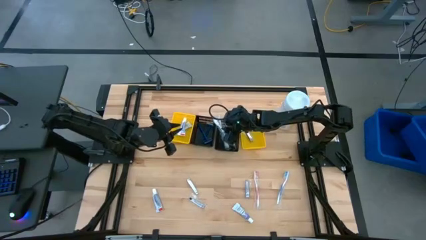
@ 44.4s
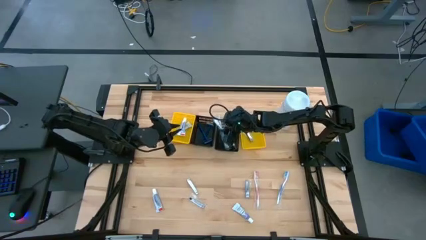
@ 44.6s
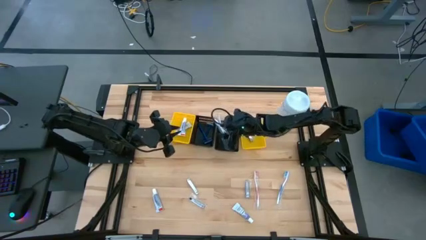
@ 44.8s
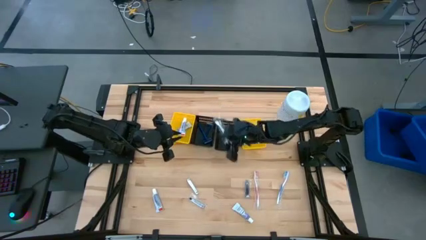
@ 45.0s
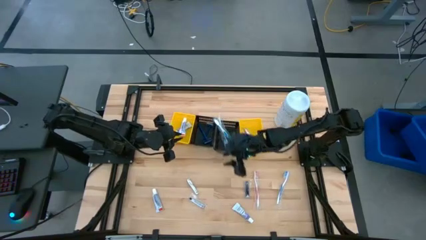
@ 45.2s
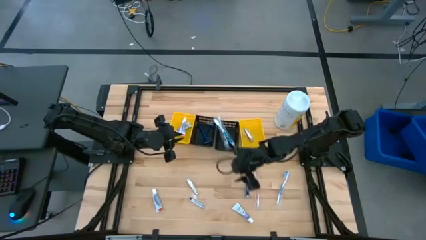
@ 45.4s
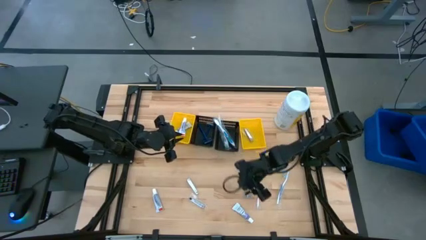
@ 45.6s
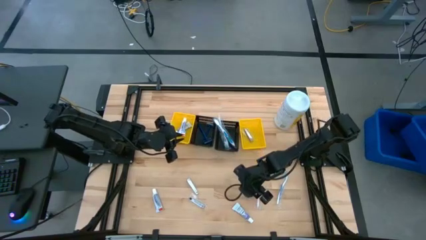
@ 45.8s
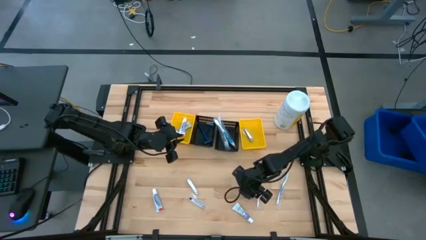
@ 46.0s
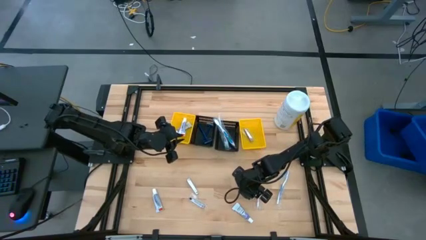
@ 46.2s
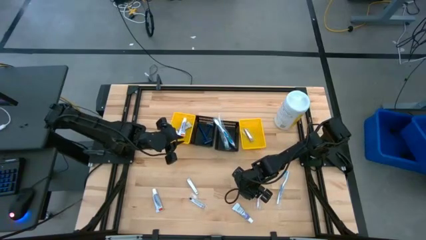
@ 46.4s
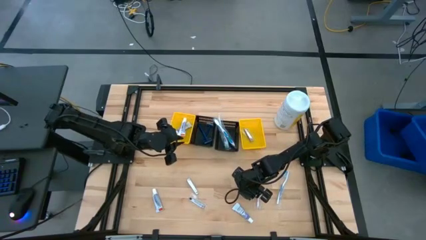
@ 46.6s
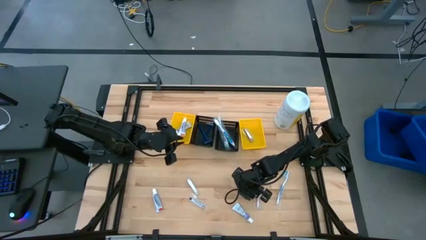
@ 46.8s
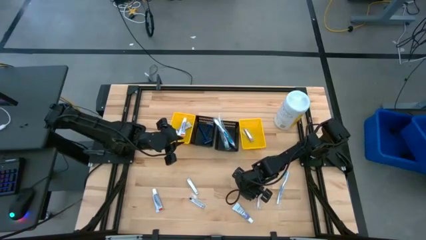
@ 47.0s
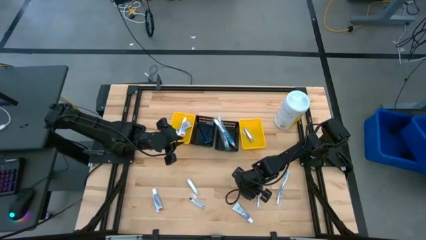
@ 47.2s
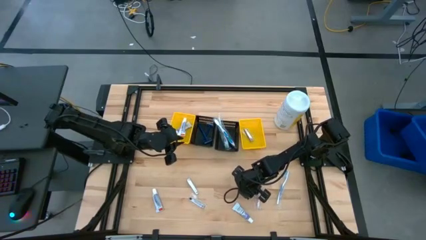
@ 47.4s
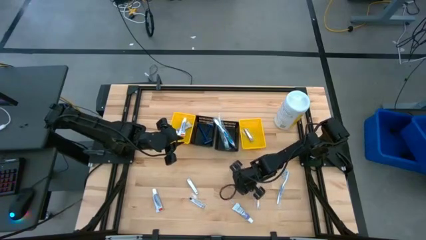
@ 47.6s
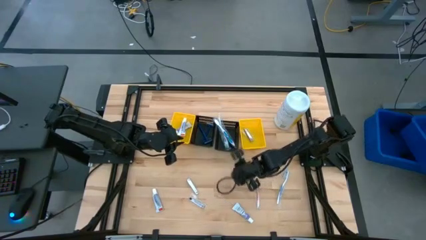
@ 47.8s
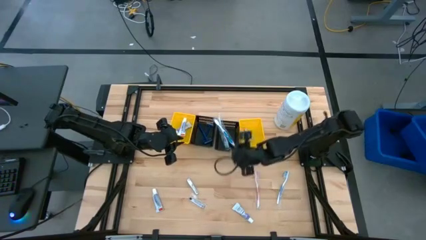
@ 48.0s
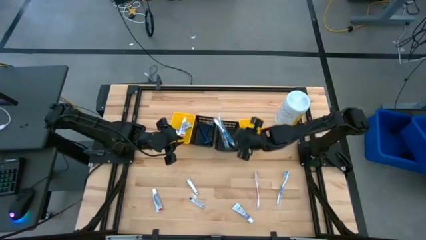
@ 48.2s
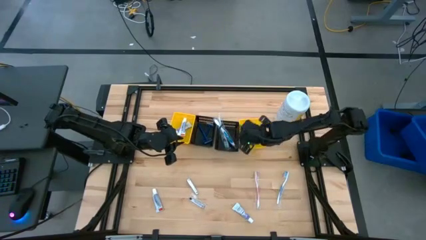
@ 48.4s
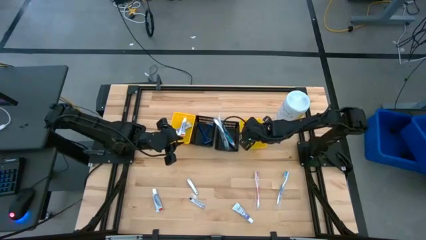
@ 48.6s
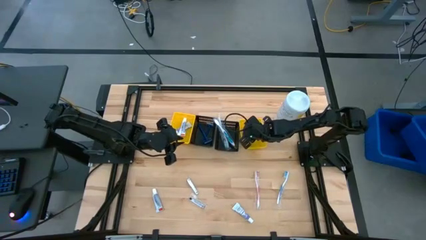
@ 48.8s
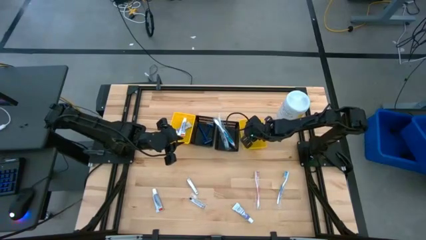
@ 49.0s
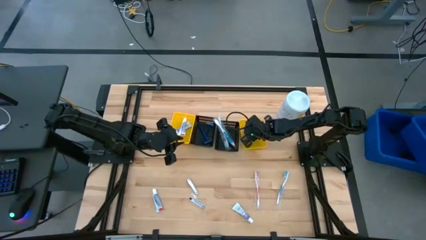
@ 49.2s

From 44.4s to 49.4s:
Task: Pick & Place Travel size toiletries
Put the silver nail cutter into the right yellow bin

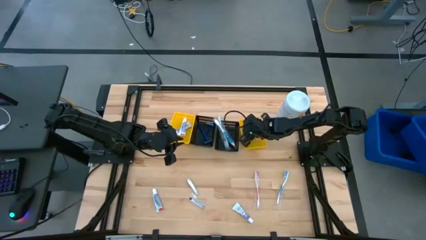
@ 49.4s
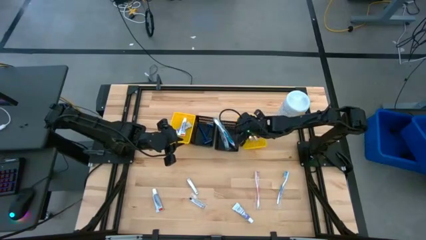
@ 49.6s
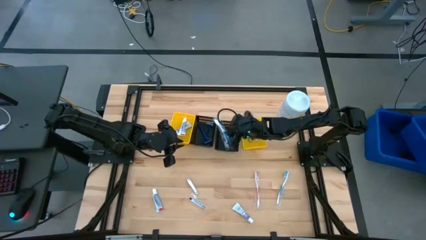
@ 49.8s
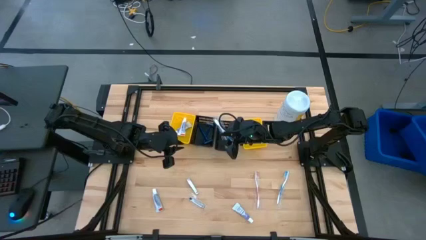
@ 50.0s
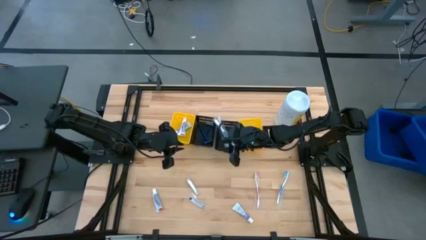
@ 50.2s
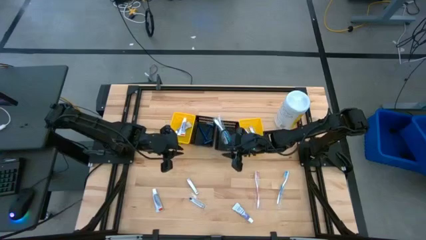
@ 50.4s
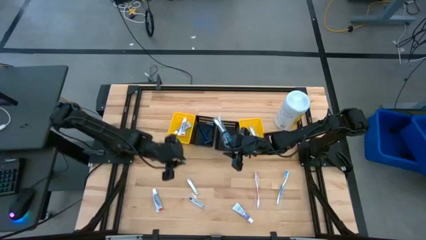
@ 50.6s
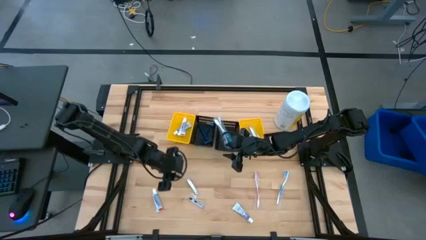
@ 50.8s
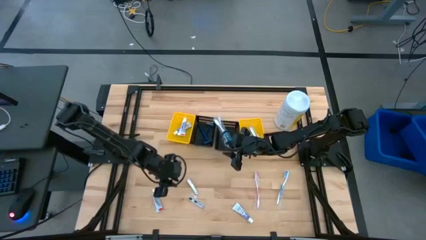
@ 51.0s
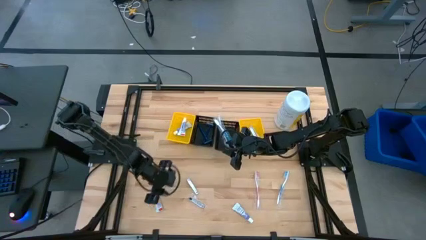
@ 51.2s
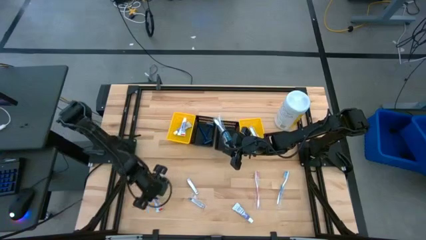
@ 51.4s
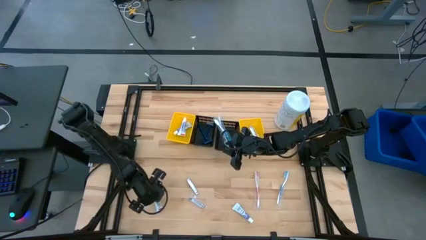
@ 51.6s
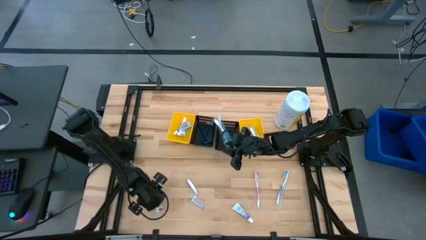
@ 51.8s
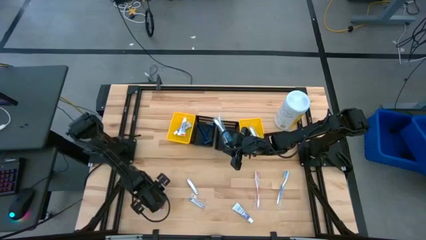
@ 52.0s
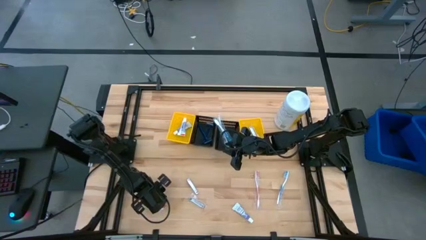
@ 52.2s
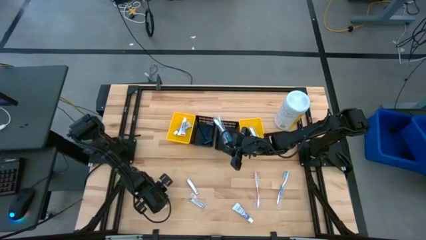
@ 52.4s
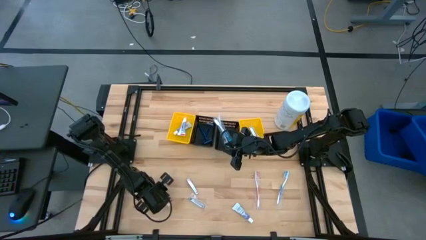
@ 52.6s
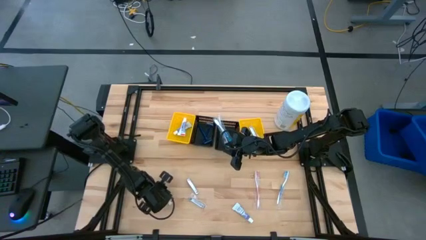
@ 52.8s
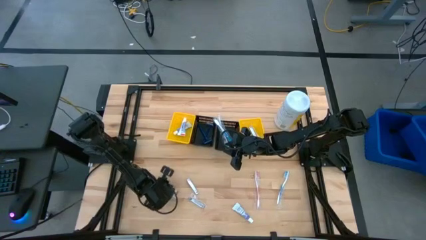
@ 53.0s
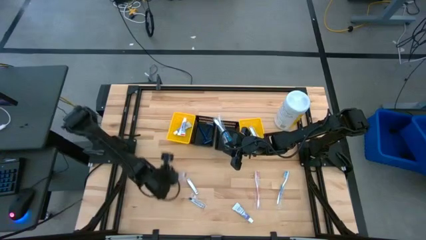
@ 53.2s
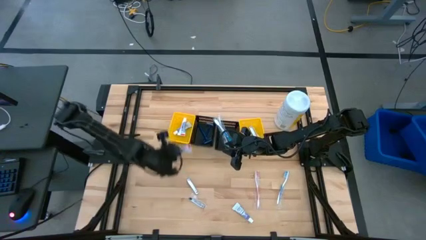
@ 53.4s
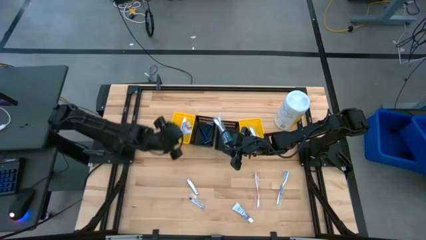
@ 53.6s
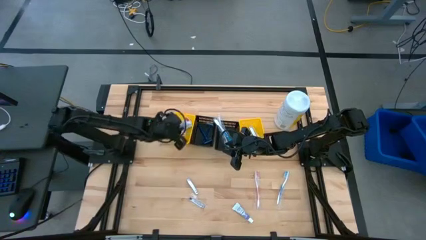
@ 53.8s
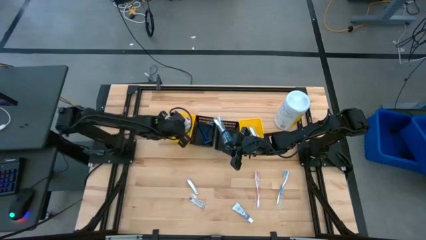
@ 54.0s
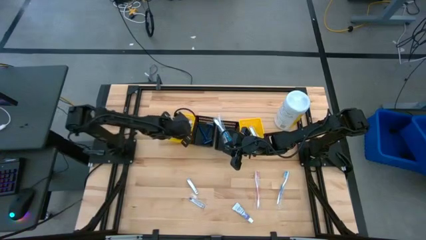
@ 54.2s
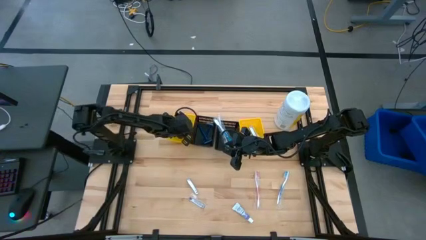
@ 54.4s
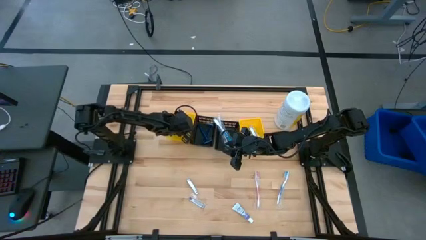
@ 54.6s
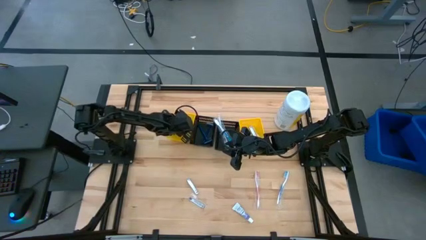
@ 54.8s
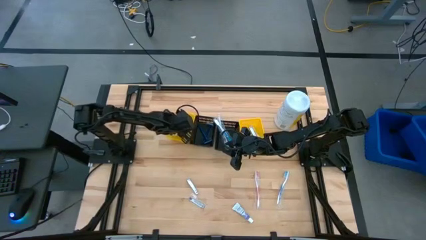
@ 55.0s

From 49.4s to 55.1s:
Put the white toothpaste into the left yellow bin

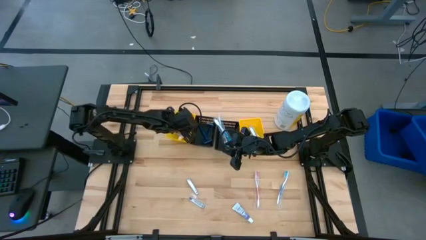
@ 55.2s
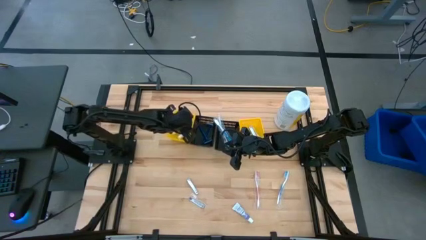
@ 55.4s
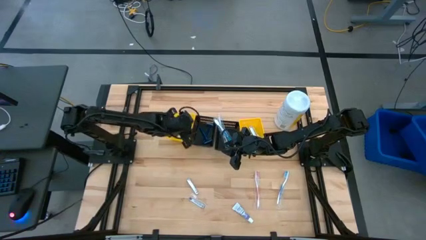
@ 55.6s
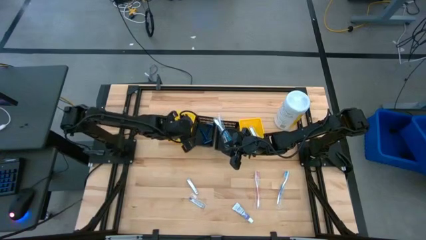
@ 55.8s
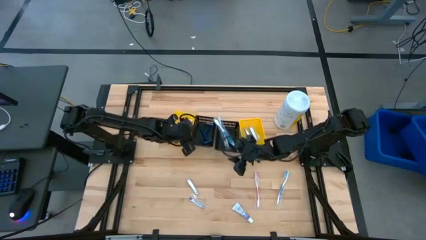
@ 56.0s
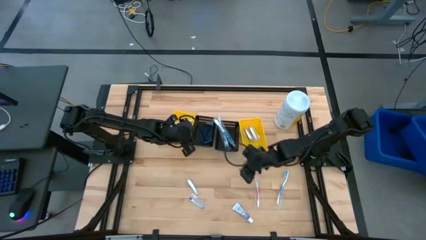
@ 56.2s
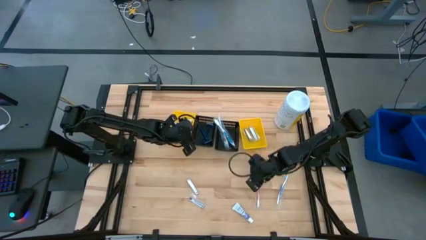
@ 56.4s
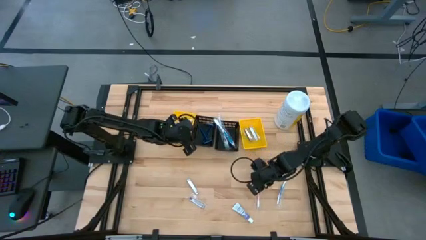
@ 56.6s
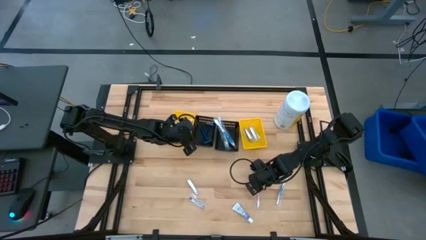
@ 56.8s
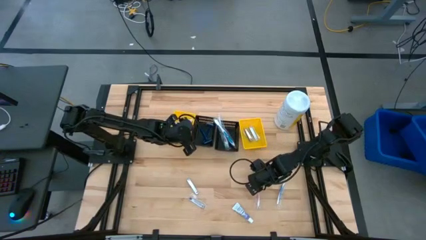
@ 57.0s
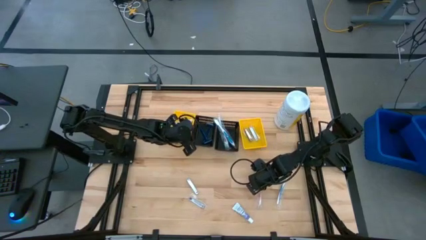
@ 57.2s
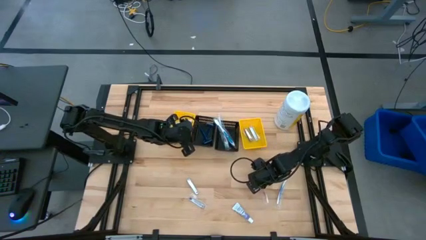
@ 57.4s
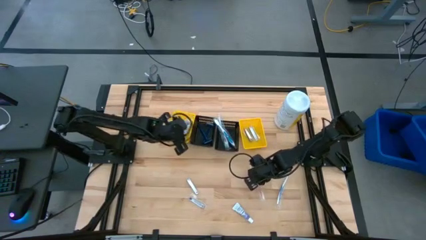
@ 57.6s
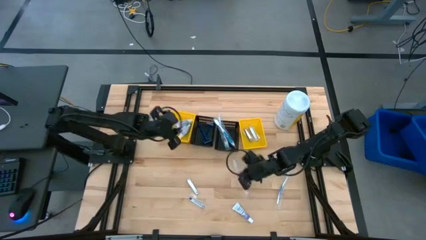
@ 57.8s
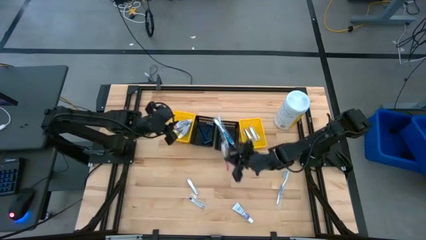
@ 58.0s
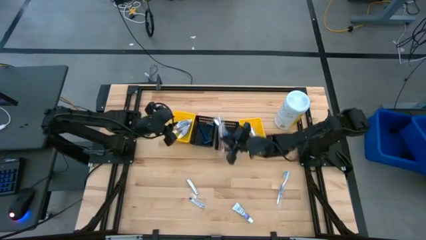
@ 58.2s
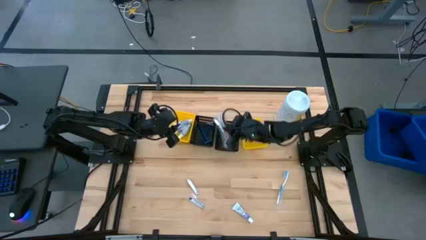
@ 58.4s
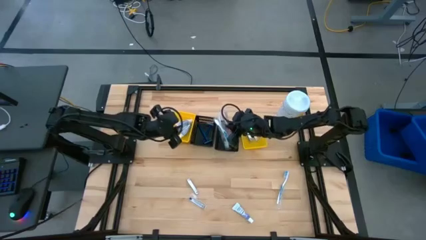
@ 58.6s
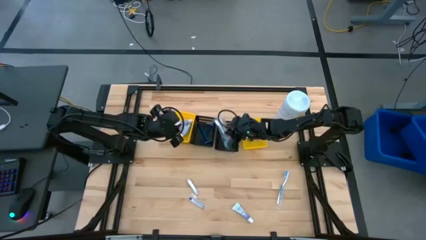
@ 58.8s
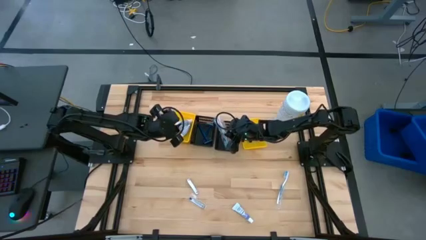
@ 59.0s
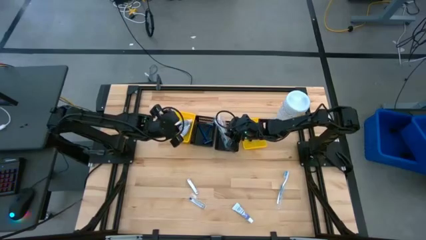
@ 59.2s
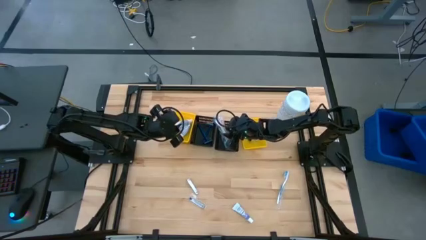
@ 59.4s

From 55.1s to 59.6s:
Put the orange toothbrush into the right black bin

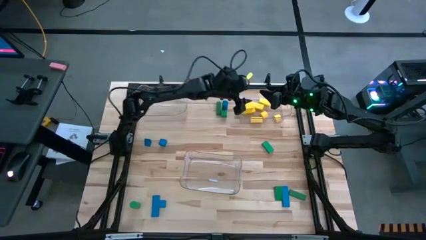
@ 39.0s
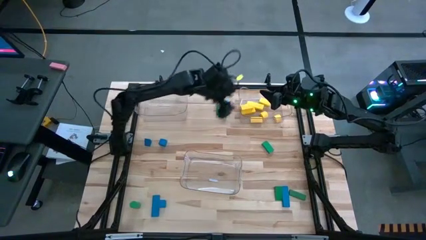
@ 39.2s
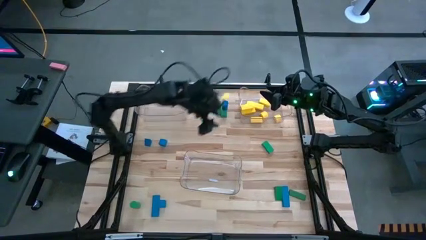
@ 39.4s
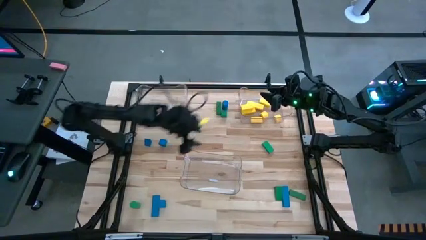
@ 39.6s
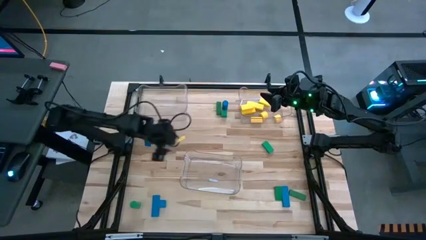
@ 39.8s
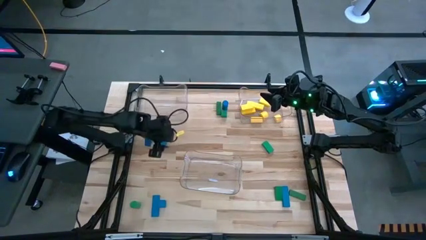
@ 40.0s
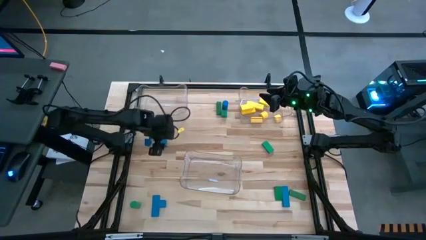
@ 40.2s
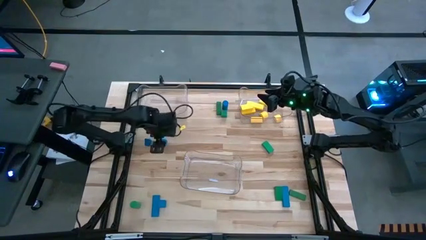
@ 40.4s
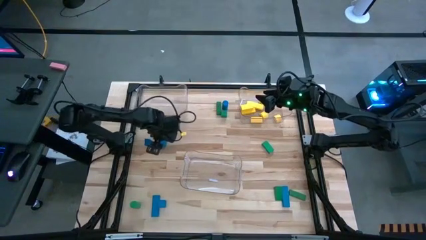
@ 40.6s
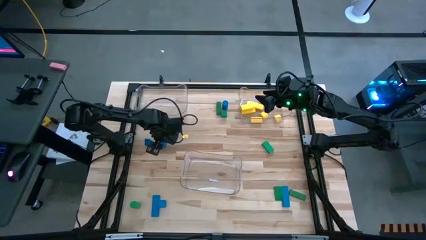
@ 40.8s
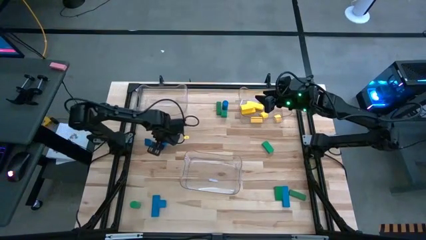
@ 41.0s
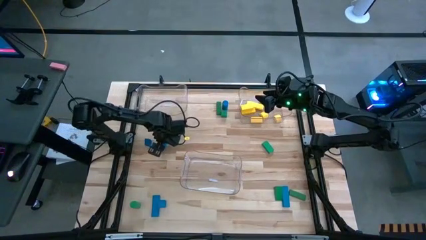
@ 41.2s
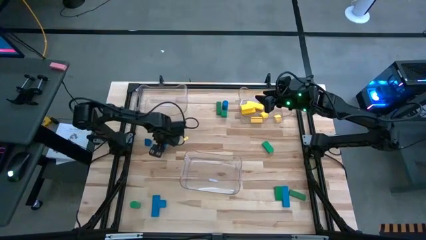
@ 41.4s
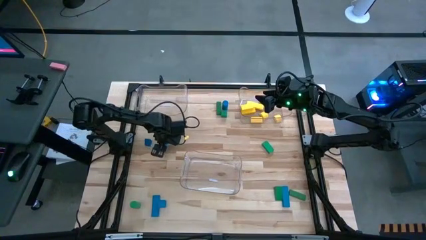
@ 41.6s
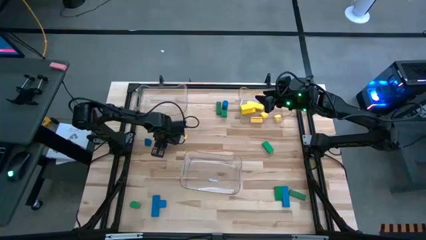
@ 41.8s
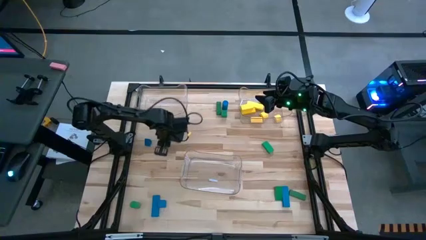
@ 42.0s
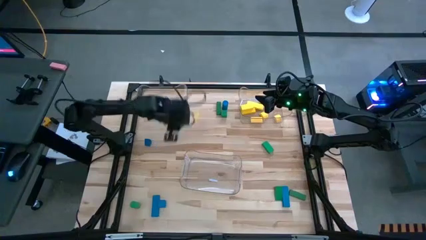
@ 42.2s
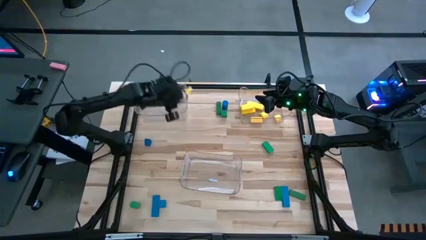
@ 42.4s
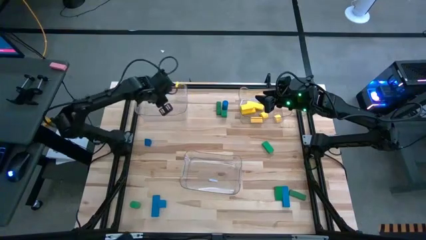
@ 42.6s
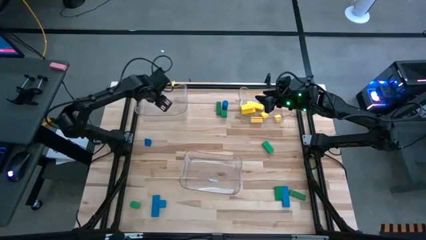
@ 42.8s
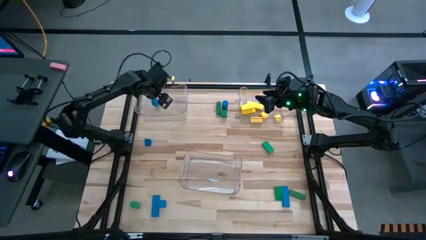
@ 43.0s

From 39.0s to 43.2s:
Task: Sort blocks
Put the blue block into the left transparent bin
